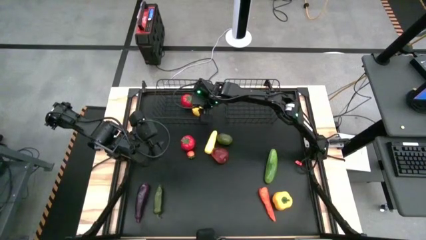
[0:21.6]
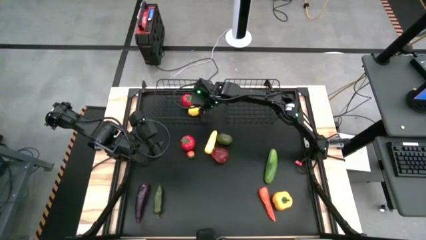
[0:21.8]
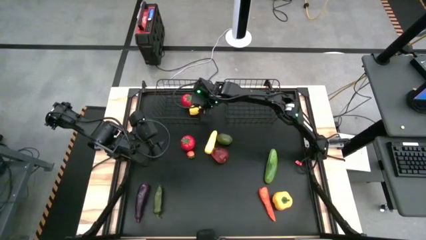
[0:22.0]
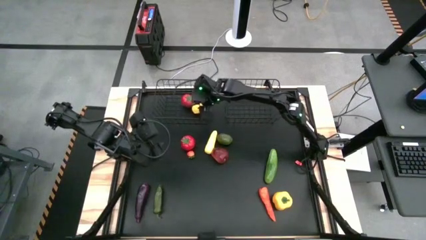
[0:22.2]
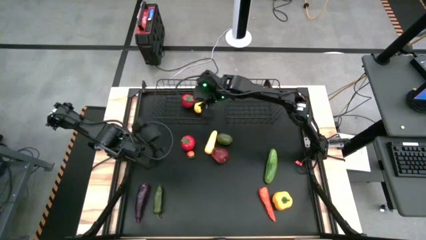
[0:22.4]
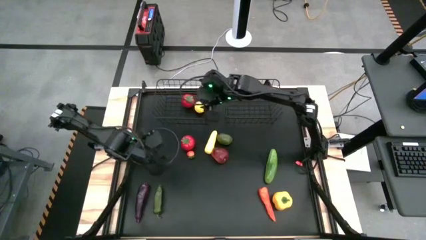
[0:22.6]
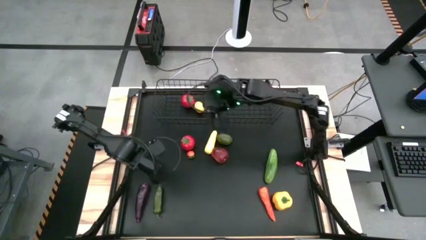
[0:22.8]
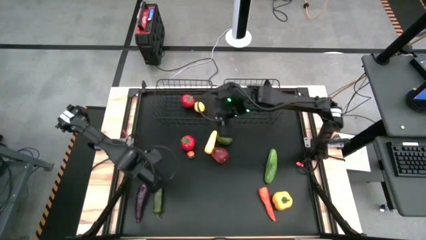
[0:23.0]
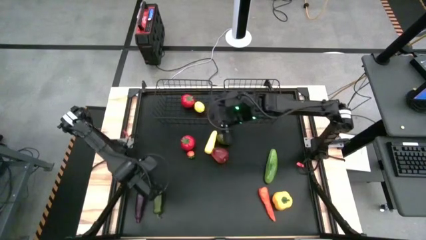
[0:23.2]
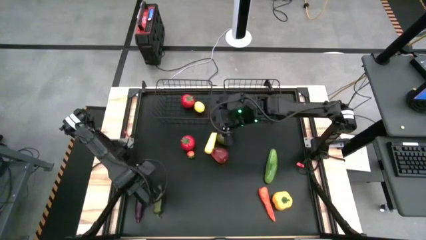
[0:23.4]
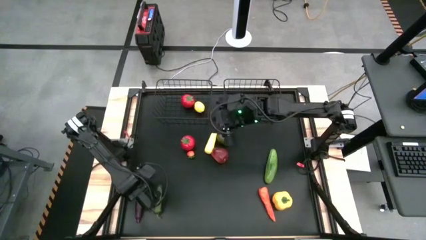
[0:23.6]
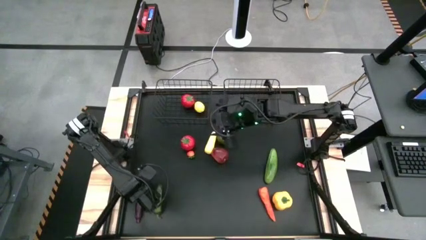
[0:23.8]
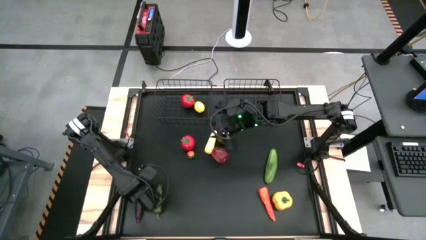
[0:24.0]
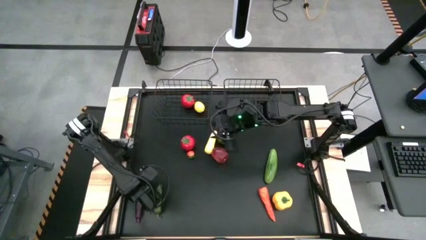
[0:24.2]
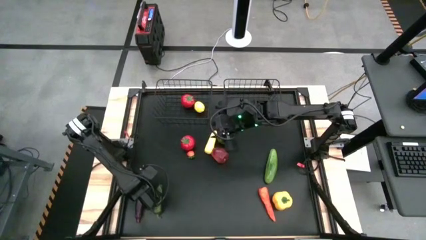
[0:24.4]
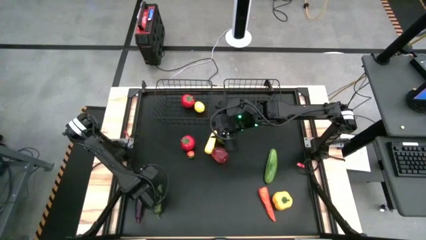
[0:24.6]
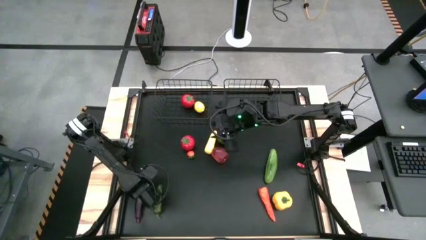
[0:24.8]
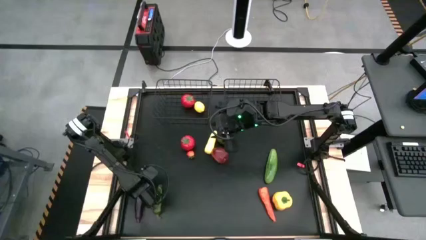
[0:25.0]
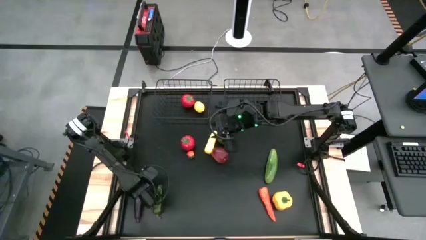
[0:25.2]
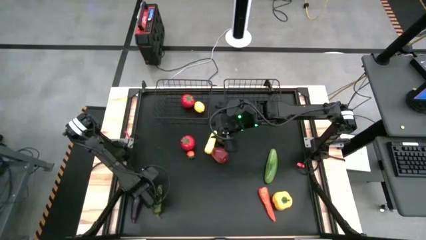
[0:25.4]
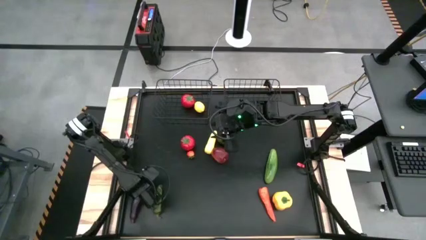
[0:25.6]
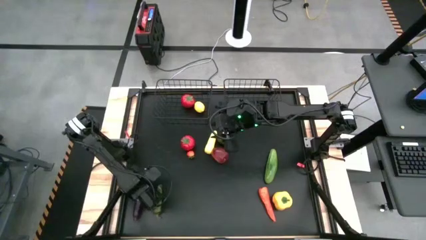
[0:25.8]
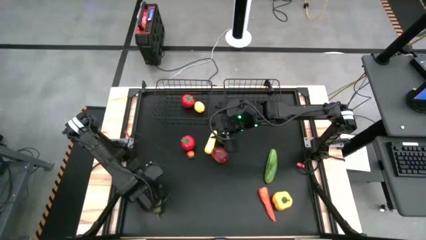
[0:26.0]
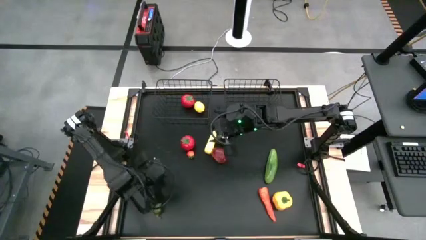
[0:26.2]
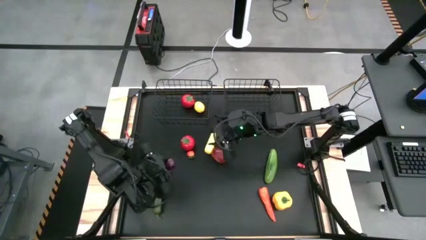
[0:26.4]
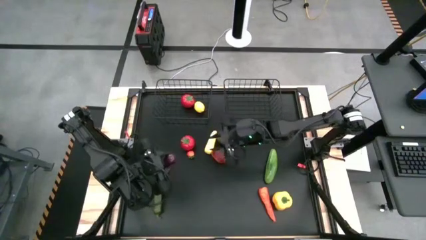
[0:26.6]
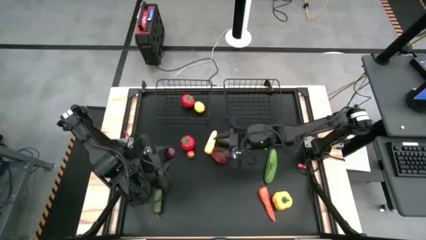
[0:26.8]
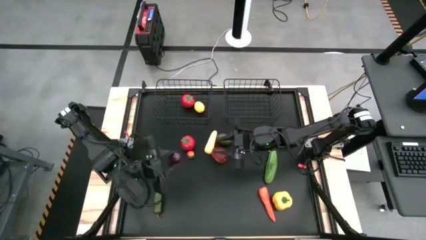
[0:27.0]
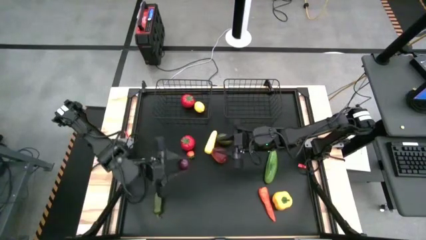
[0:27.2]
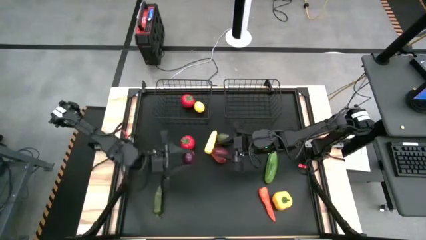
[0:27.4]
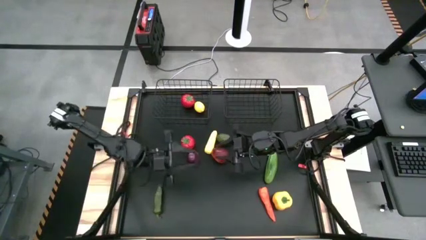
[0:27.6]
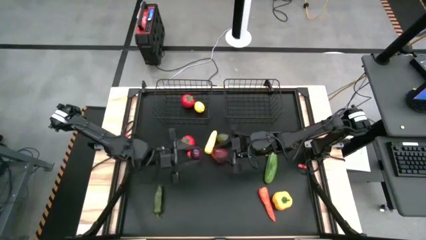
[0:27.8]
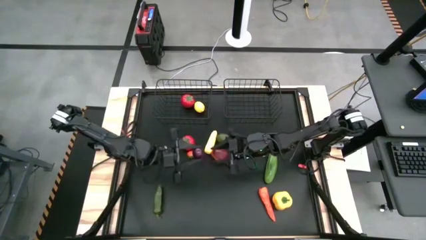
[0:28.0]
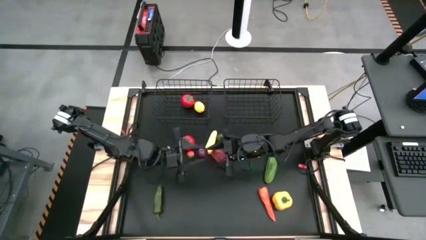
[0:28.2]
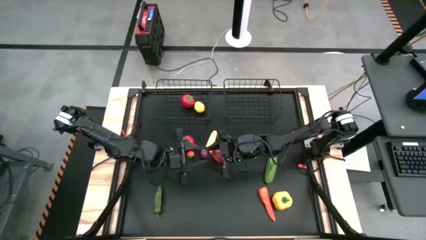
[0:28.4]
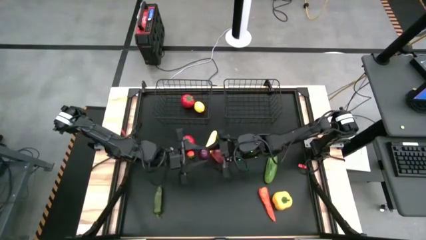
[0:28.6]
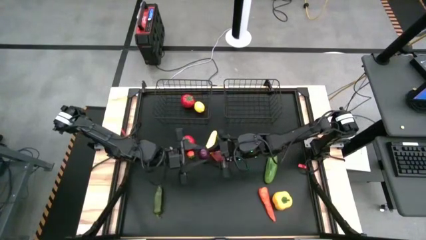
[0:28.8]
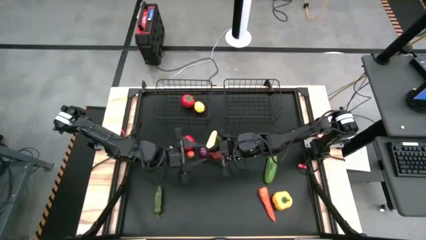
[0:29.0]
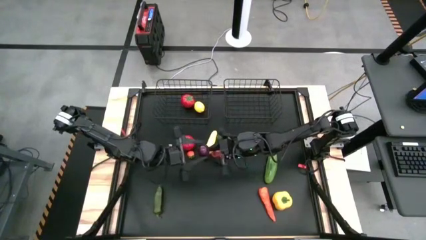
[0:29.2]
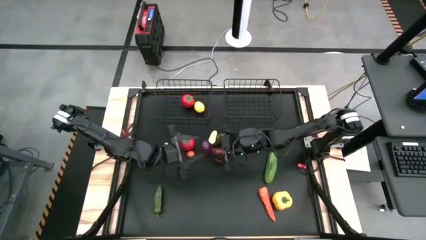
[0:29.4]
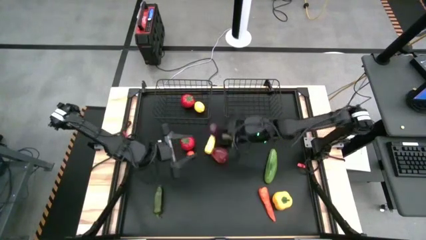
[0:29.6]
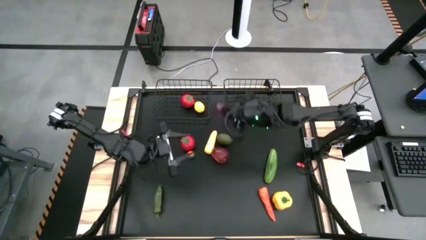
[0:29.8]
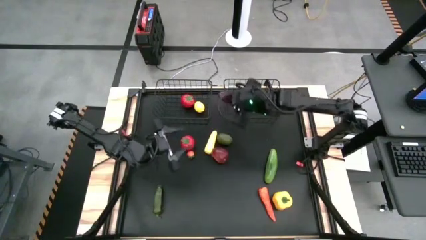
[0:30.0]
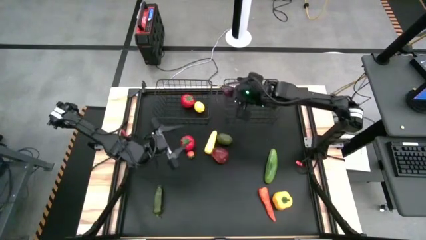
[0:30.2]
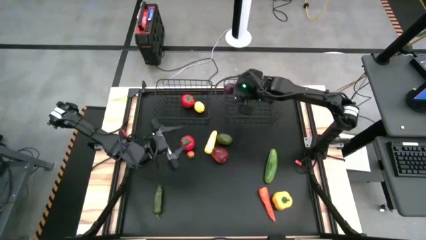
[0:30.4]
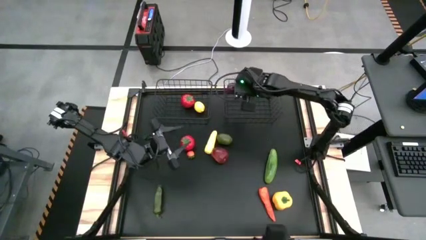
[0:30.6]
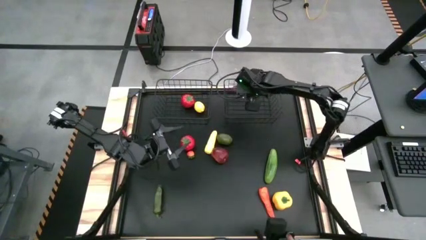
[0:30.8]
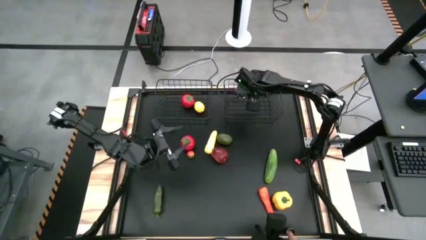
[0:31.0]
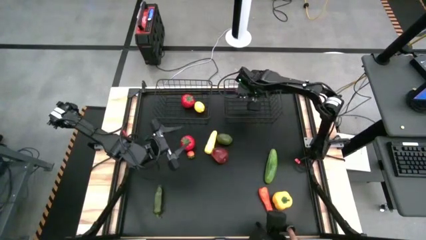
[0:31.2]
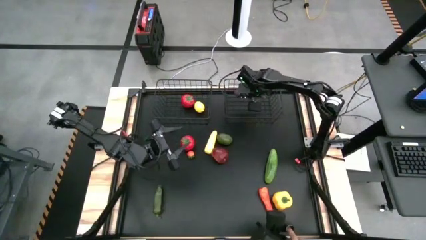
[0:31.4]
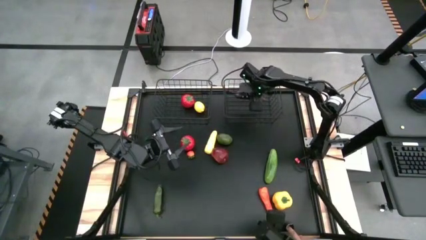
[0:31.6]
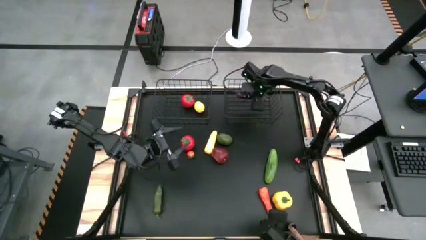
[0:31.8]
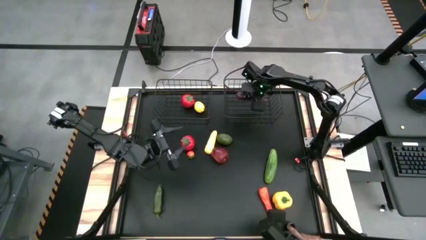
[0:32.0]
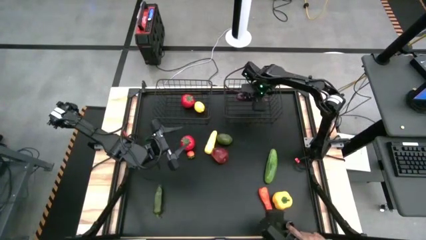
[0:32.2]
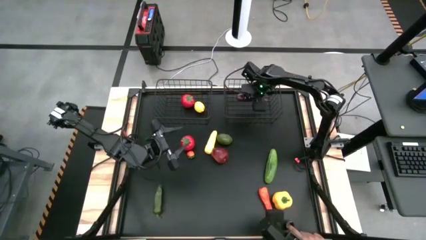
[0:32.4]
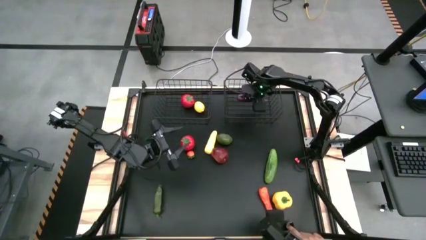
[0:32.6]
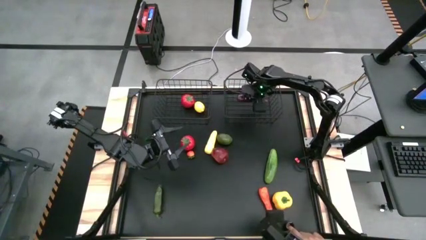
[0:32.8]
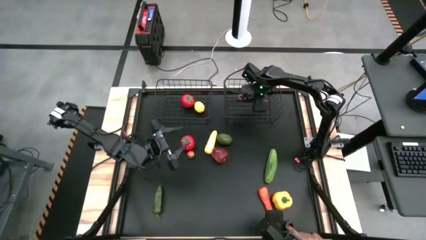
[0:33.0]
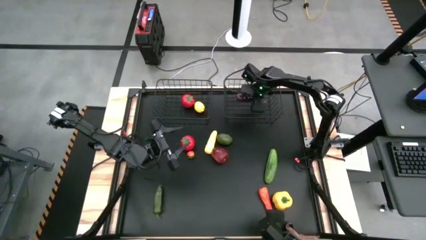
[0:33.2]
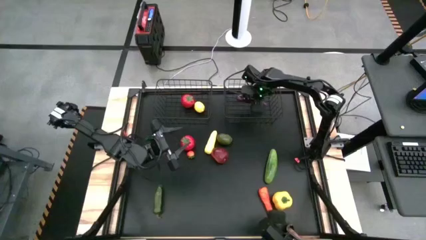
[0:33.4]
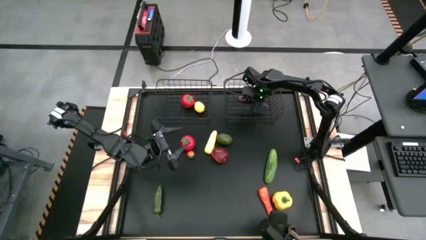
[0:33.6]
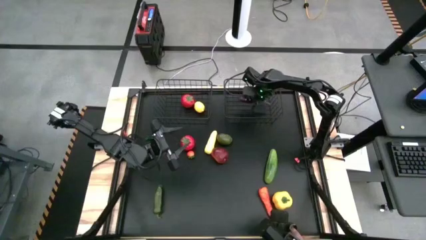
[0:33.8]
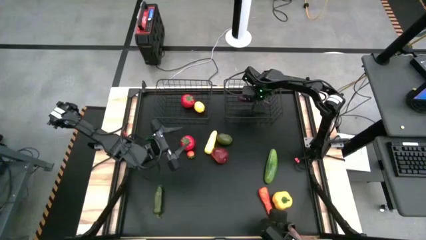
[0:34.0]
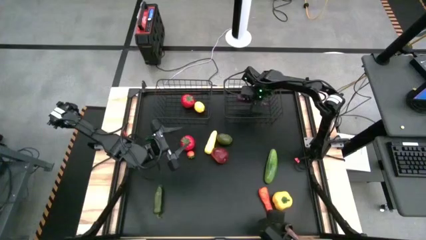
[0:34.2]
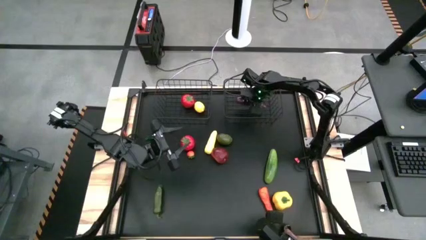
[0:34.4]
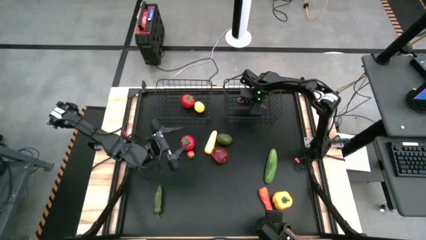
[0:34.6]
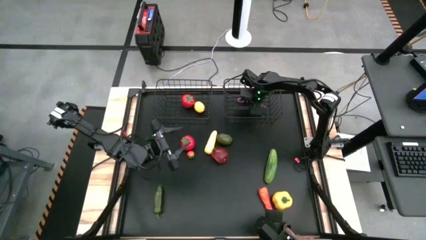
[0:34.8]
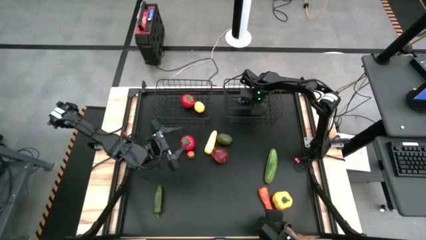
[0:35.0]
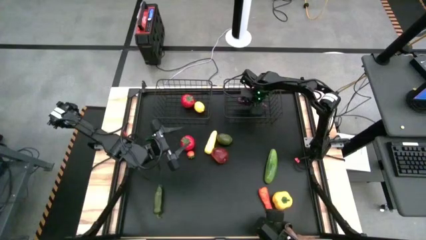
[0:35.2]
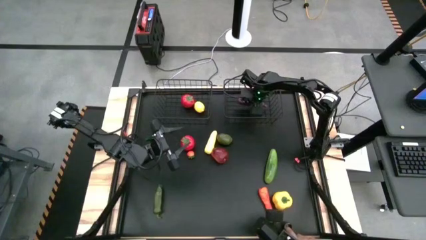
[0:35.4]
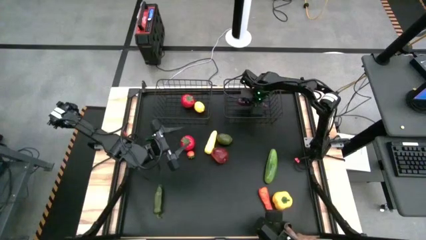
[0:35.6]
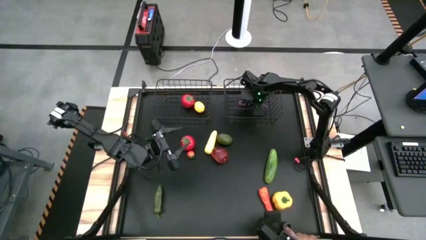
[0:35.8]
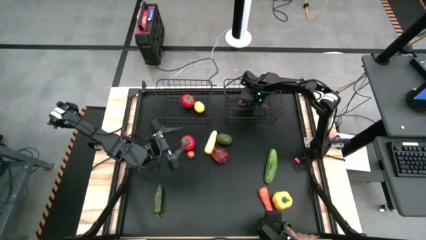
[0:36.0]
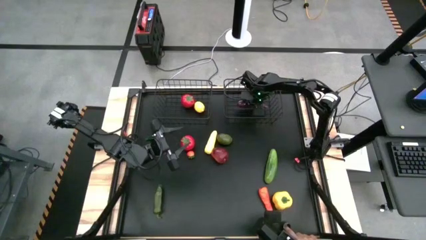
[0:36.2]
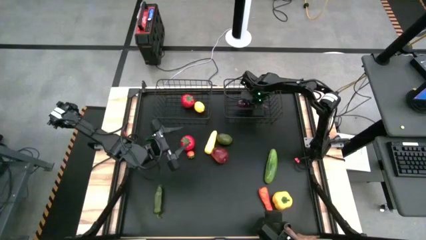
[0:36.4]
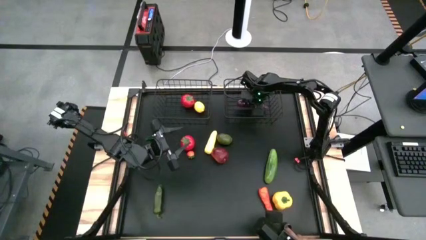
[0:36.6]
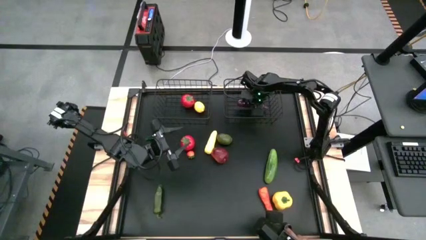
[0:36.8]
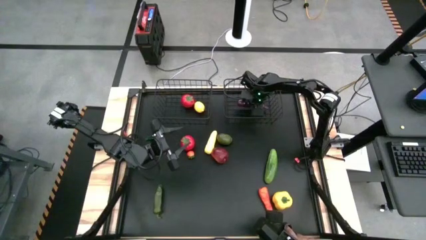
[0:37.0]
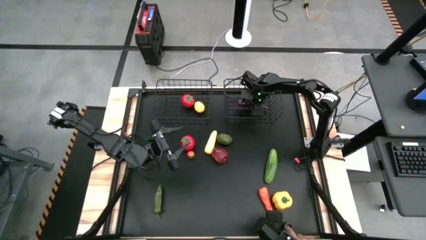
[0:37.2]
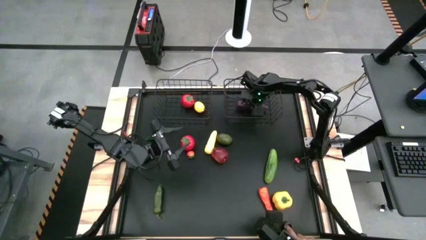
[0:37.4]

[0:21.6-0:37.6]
Task: Sort produce into baskets
Put the eggplant into the right wire basket
